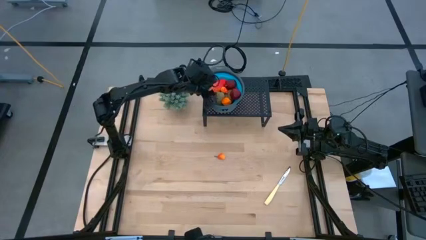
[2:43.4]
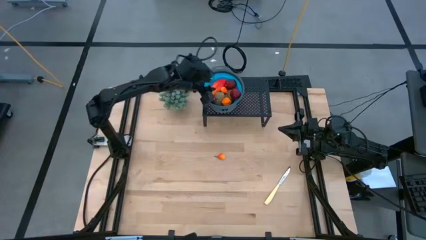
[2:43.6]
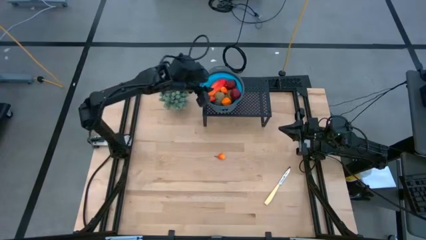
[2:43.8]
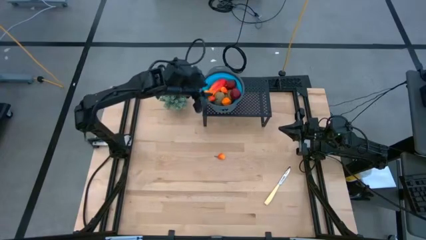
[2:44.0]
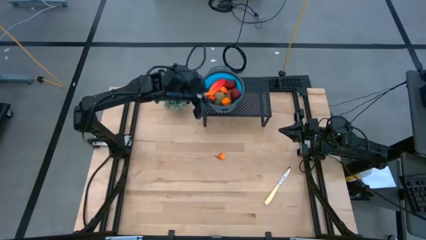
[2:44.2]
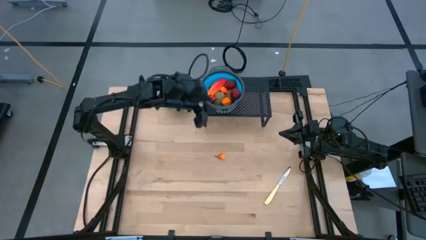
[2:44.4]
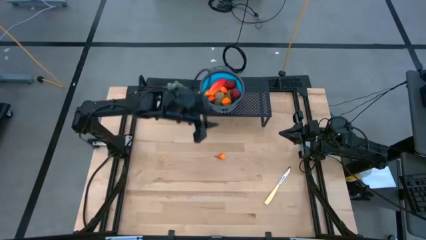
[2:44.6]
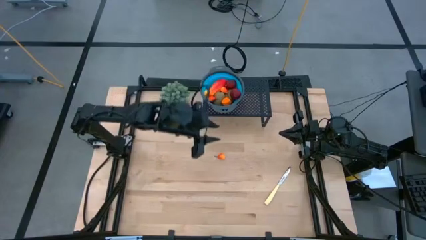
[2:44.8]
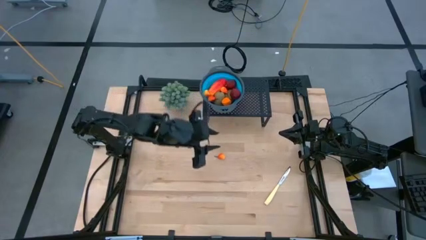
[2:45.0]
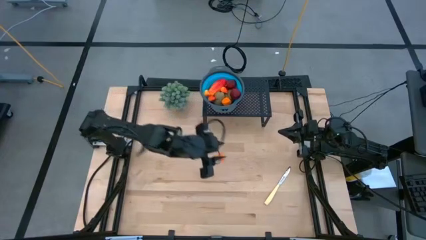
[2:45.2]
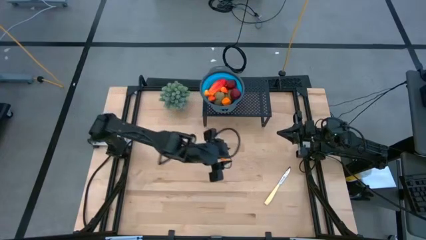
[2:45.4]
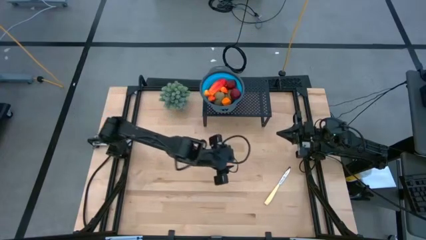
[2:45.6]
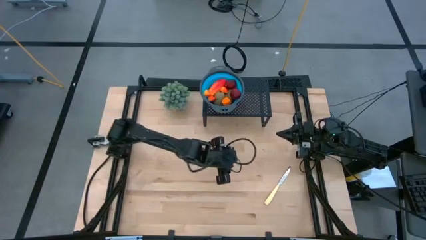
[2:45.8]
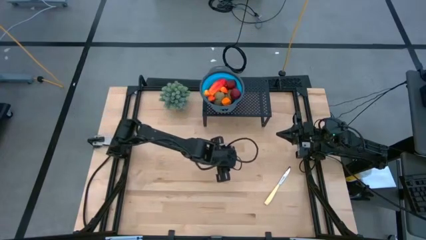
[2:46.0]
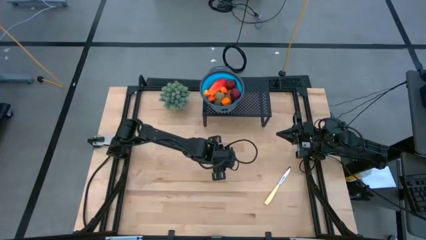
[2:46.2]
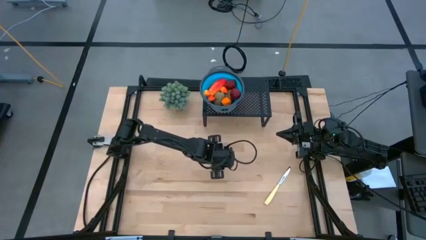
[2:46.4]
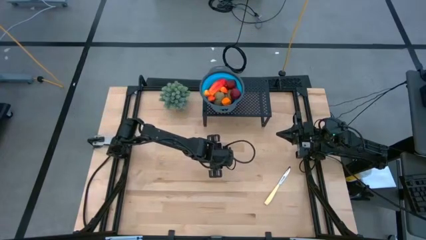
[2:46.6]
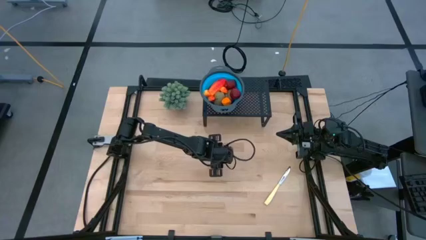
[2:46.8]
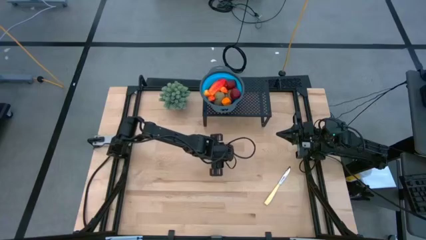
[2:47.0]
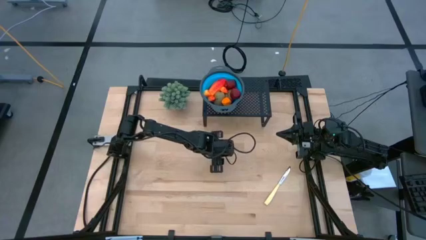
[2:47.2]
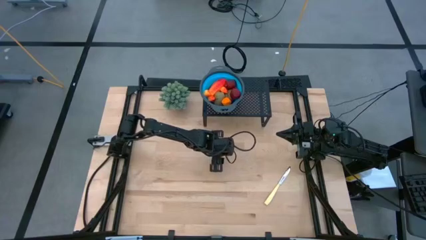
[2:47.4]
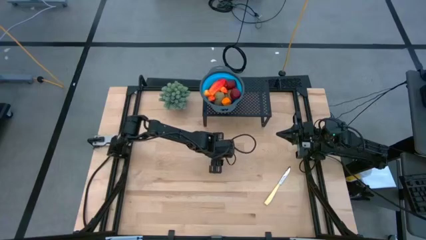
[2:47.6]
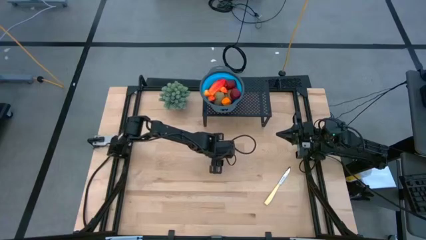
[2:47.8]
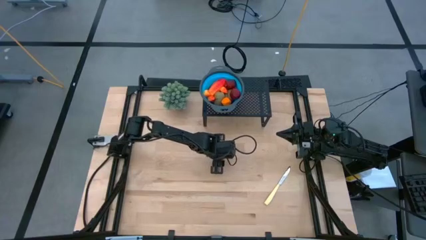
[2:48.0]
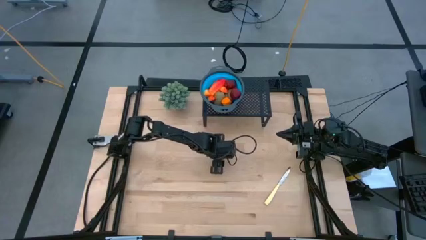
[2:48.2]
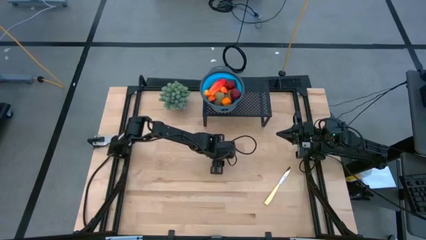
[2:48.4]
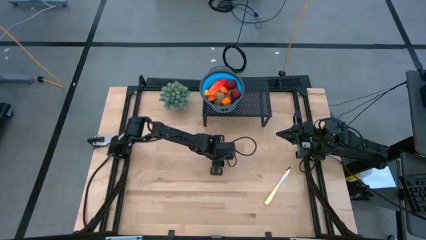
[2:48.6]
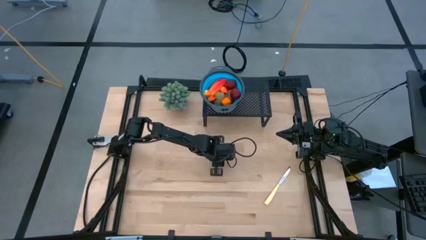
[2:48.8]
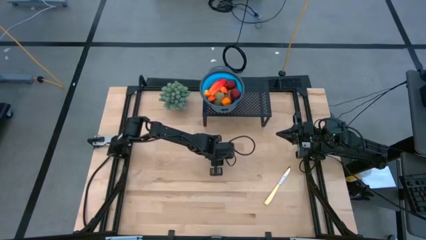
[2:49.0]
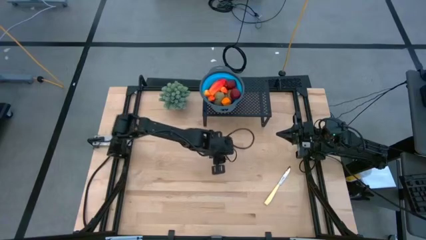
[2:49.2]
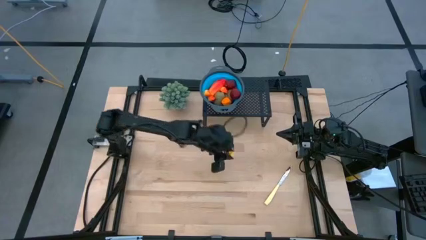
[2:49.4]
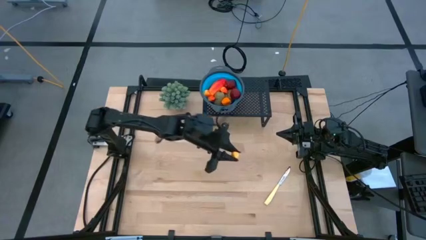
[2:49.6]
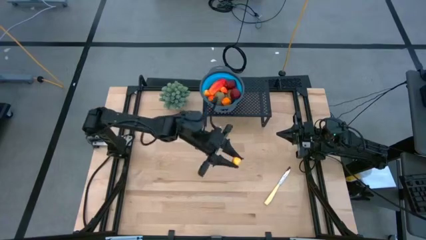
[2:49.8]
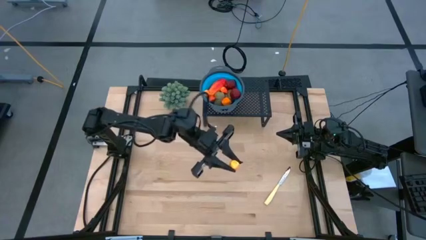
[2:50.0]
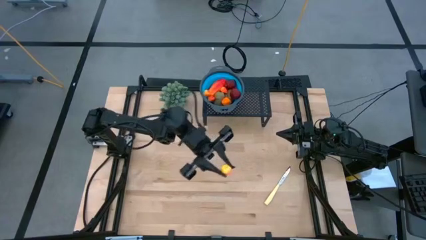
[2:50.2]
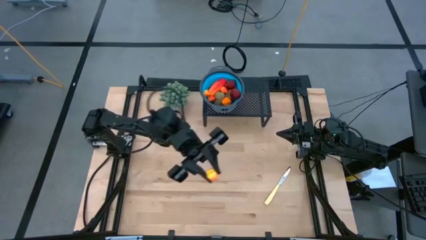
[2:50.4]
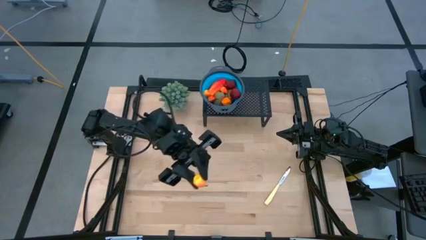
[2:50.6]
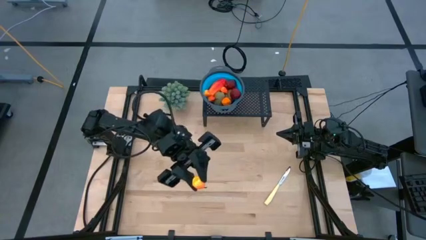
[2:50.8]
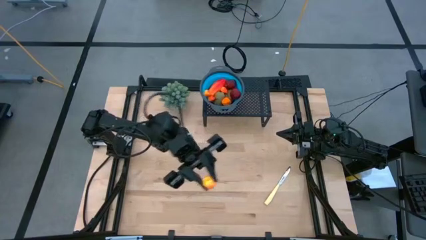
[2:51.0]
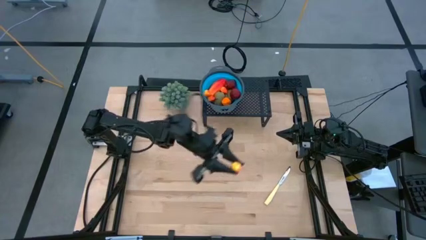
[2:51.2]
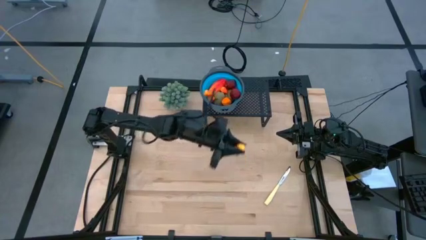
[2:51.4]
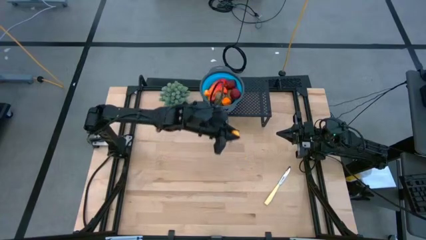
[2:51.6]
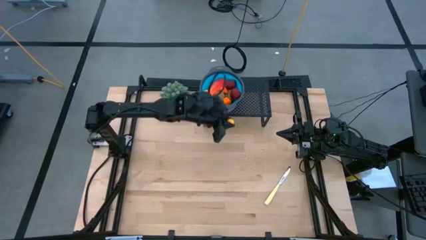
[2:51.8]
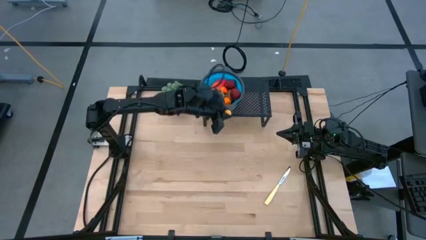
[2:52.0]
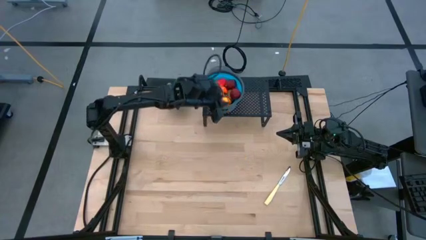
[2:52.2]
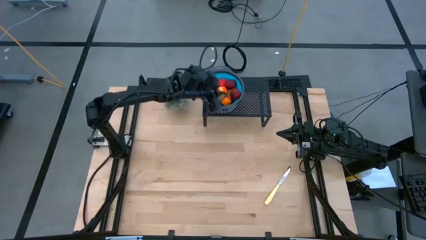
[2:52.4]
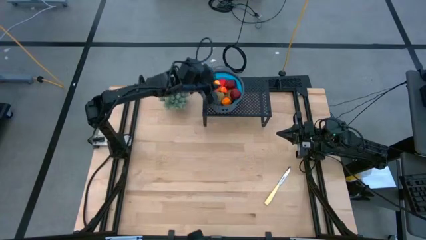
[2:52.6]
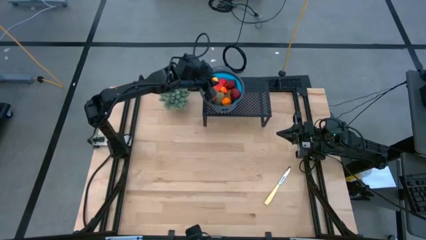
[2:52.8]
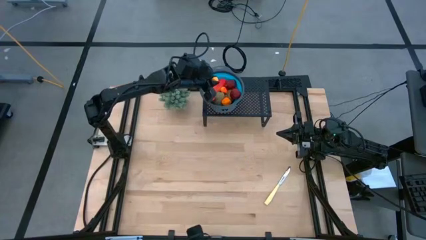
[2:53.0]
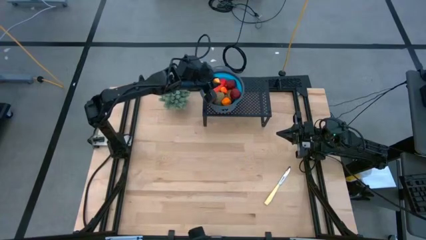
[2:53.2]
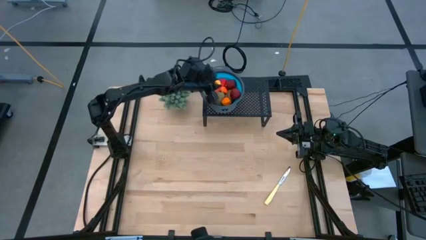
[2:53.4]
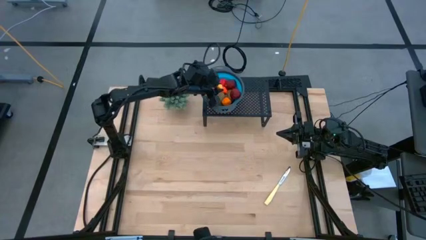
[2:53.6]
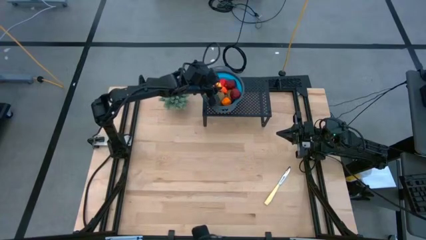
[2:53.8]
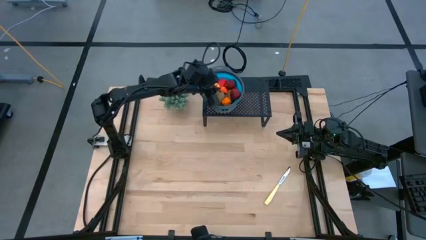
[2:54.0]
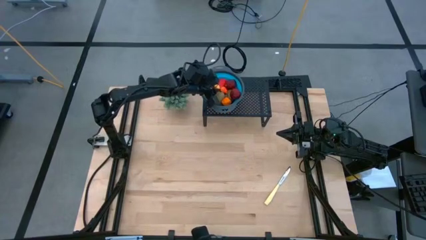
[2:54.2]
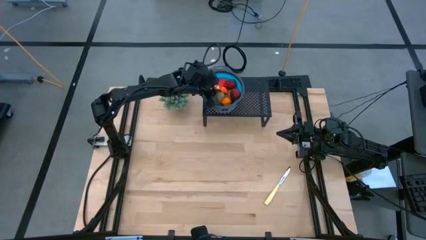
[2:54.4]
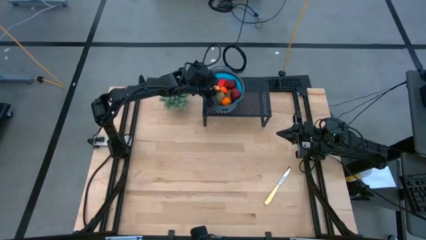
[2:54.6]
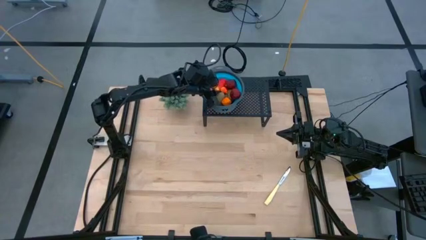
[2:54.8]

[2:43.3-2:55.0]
Task: Pick & Place Fruit
Put the orange peach into the blue strainer bowl on the shelf
